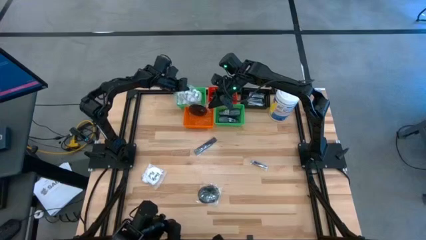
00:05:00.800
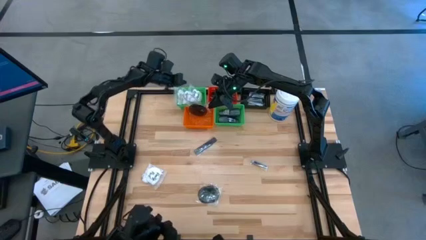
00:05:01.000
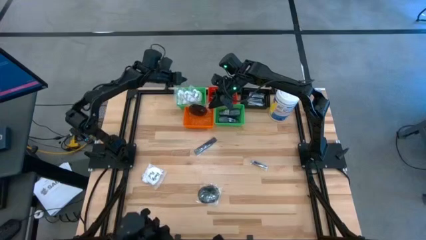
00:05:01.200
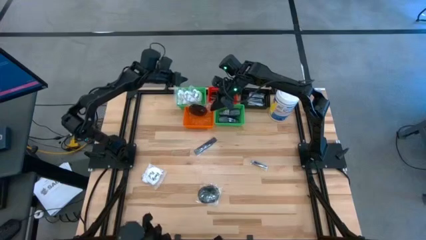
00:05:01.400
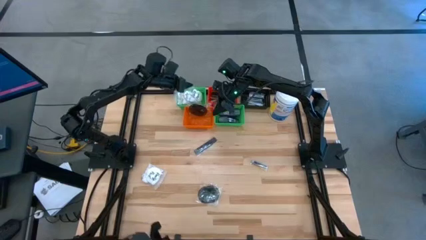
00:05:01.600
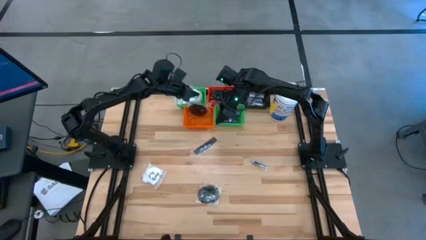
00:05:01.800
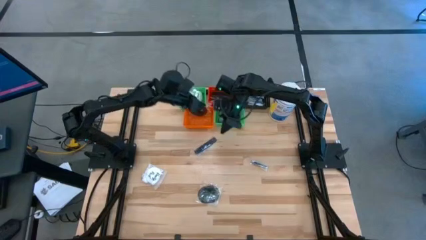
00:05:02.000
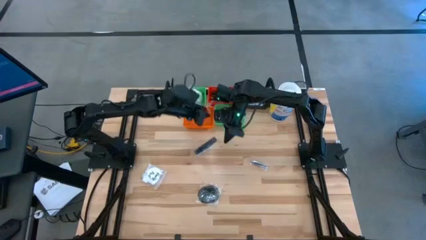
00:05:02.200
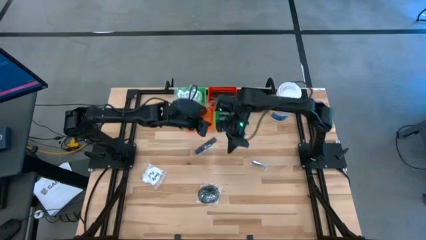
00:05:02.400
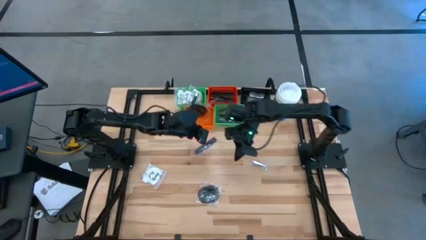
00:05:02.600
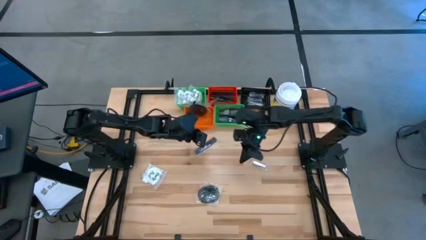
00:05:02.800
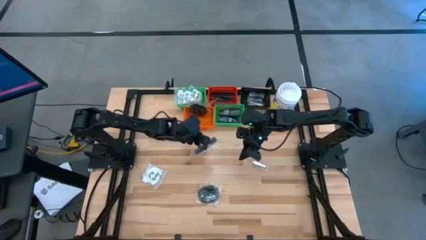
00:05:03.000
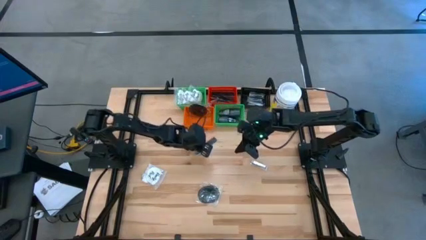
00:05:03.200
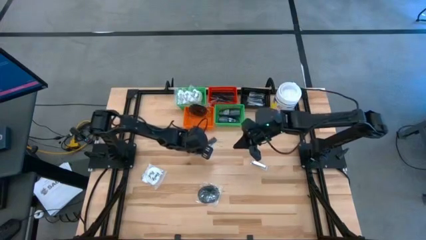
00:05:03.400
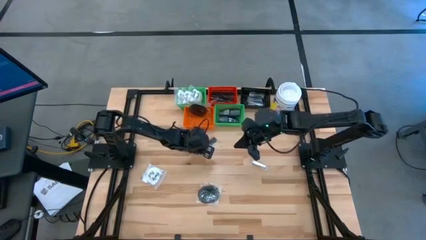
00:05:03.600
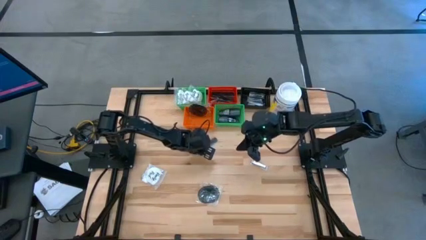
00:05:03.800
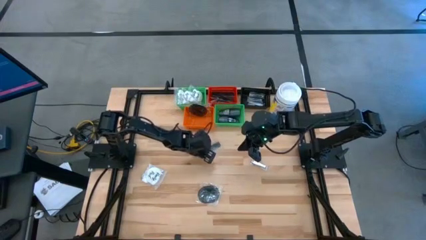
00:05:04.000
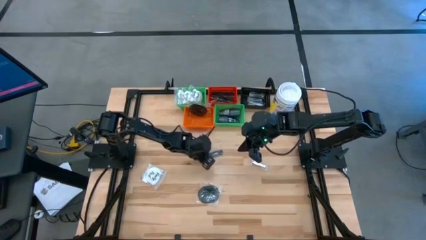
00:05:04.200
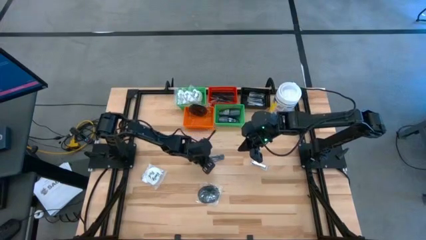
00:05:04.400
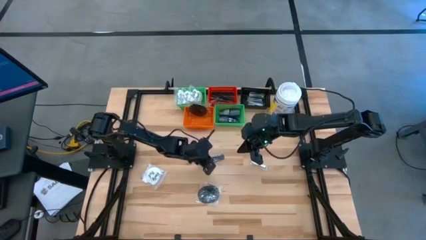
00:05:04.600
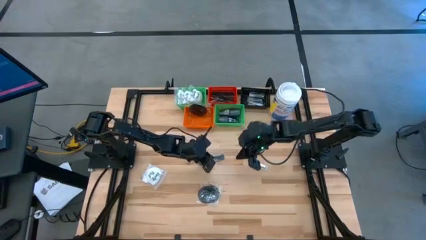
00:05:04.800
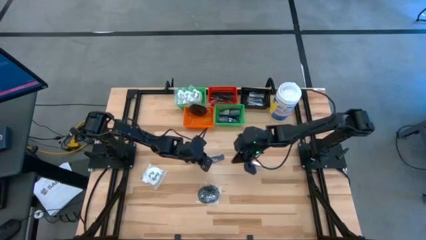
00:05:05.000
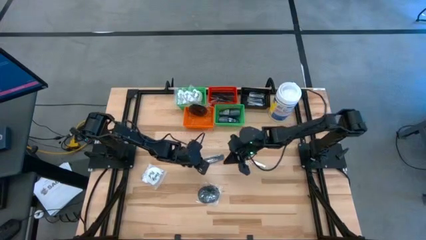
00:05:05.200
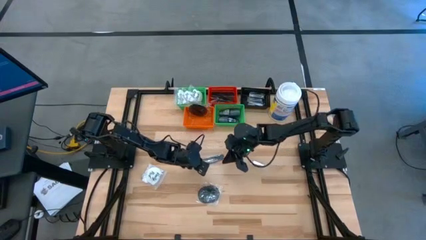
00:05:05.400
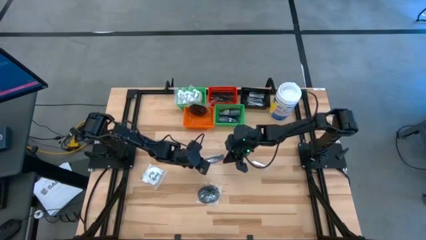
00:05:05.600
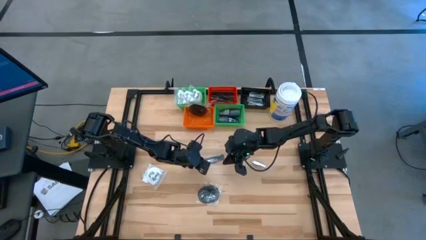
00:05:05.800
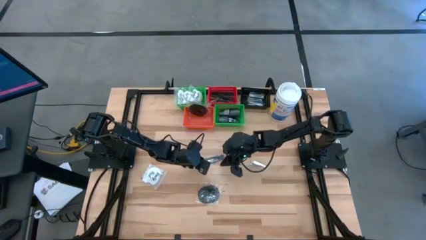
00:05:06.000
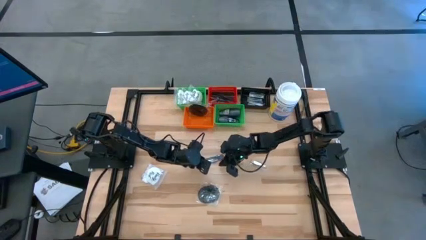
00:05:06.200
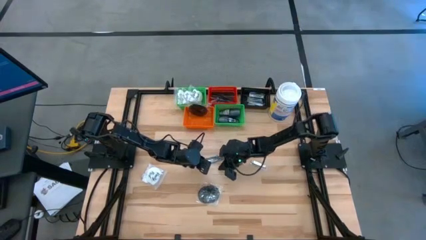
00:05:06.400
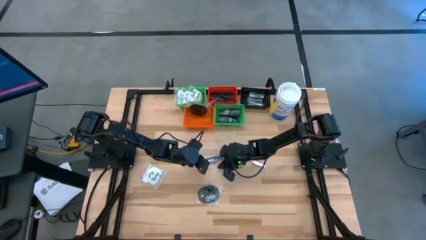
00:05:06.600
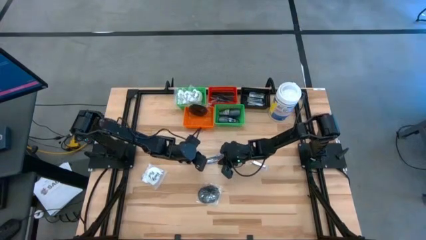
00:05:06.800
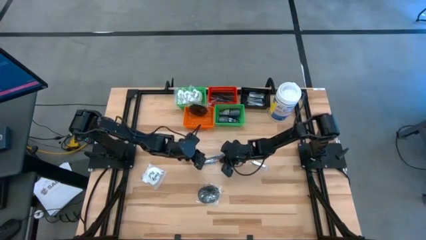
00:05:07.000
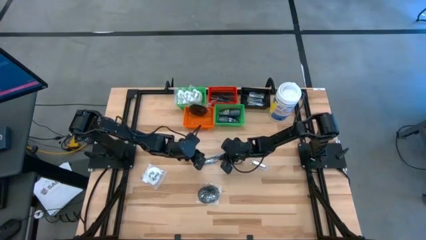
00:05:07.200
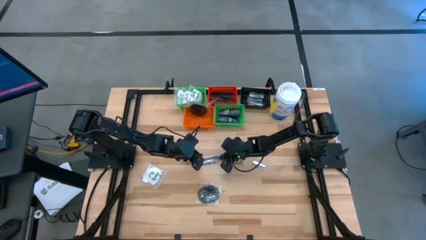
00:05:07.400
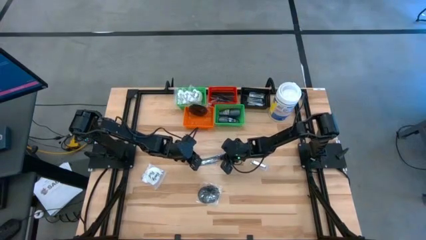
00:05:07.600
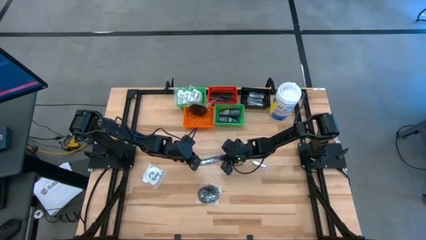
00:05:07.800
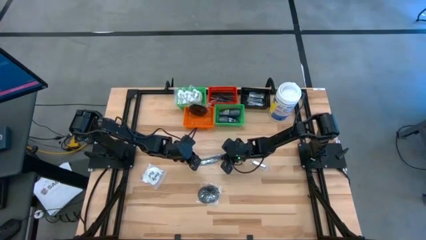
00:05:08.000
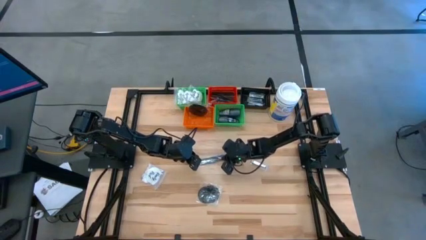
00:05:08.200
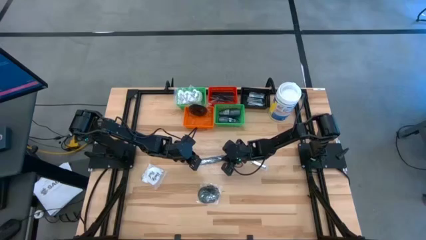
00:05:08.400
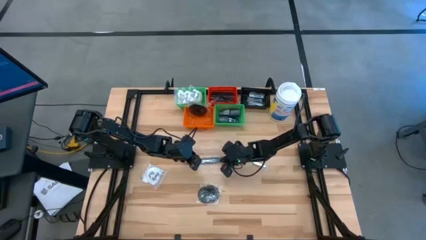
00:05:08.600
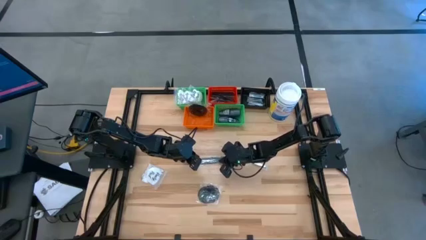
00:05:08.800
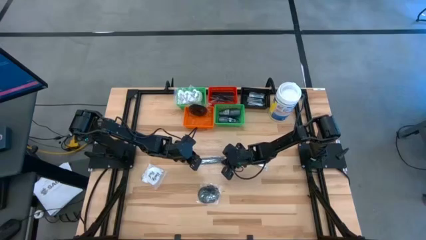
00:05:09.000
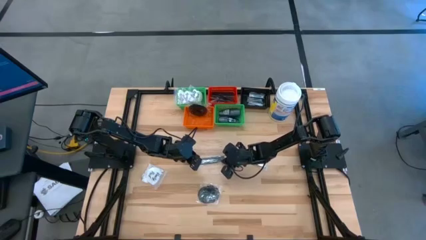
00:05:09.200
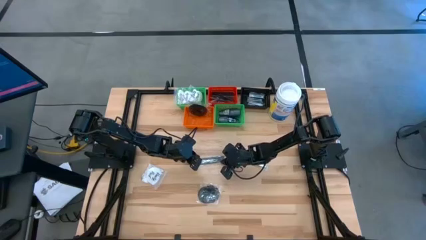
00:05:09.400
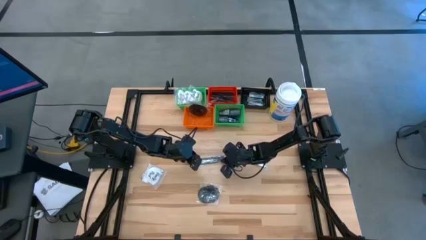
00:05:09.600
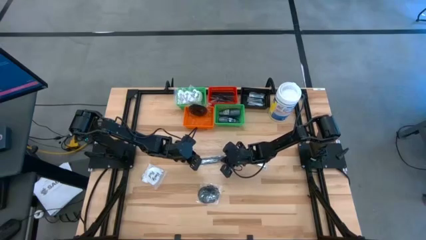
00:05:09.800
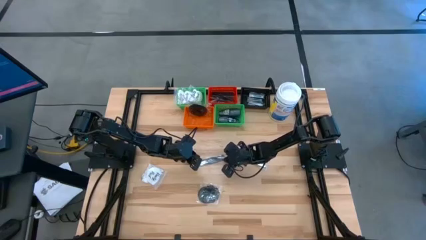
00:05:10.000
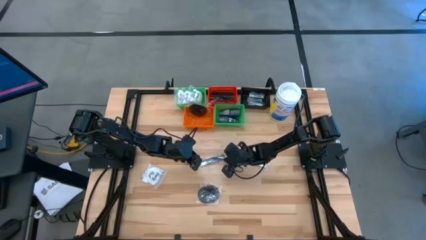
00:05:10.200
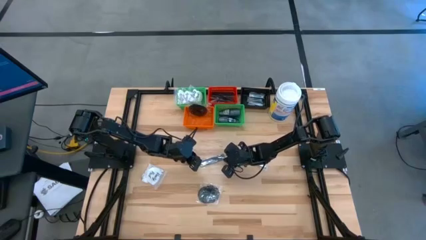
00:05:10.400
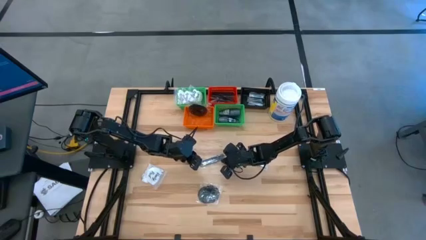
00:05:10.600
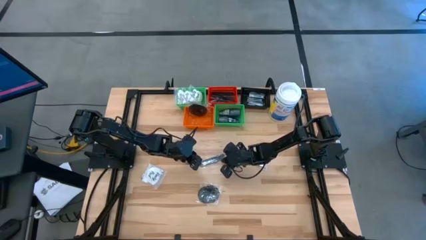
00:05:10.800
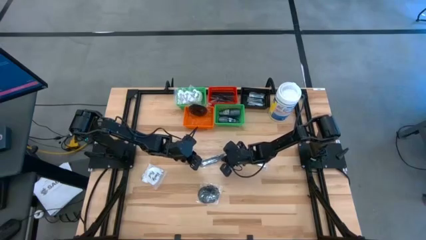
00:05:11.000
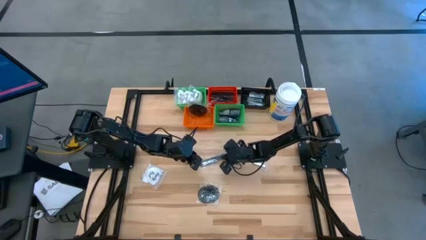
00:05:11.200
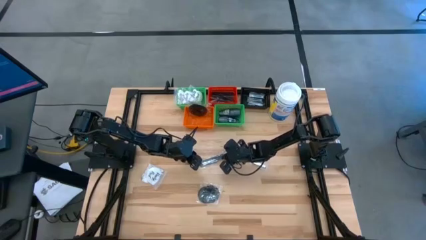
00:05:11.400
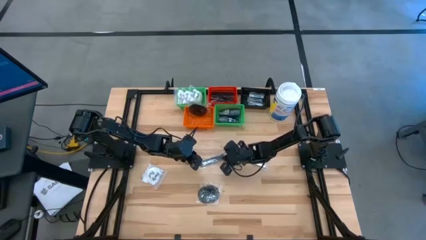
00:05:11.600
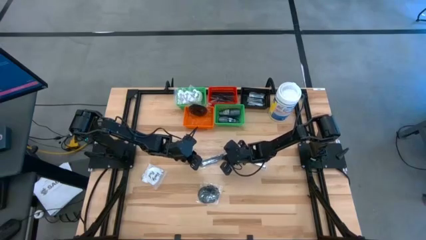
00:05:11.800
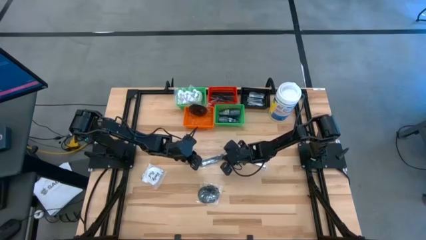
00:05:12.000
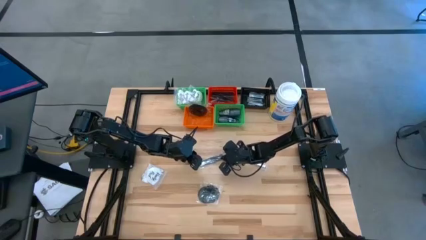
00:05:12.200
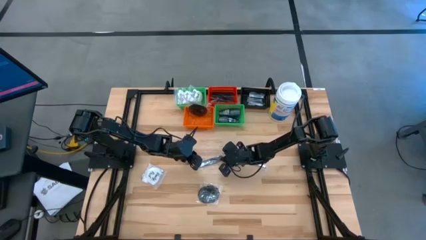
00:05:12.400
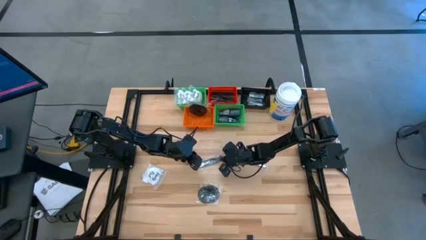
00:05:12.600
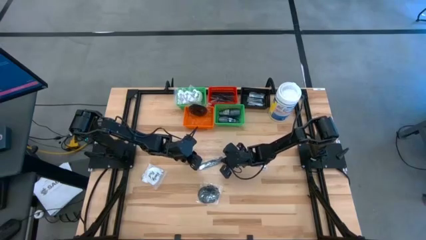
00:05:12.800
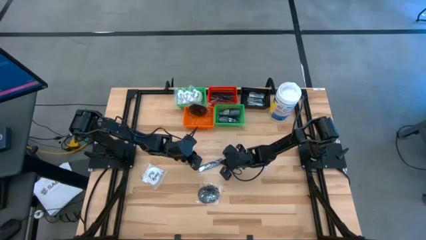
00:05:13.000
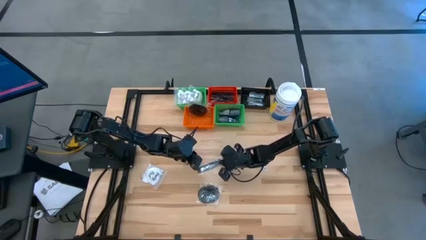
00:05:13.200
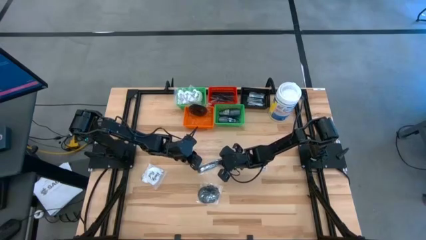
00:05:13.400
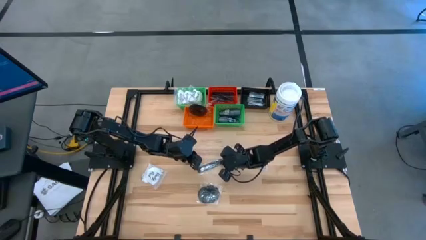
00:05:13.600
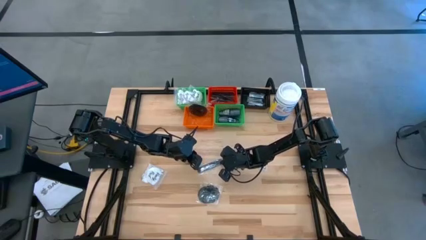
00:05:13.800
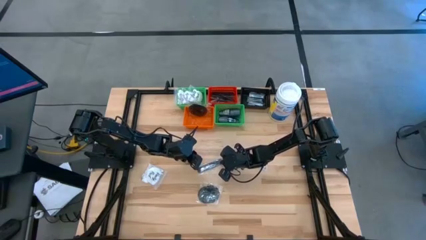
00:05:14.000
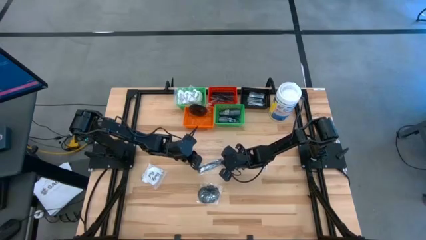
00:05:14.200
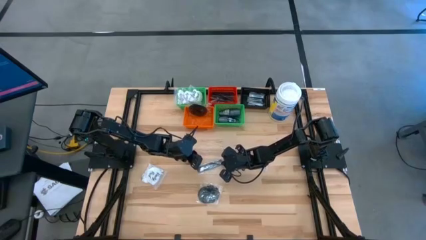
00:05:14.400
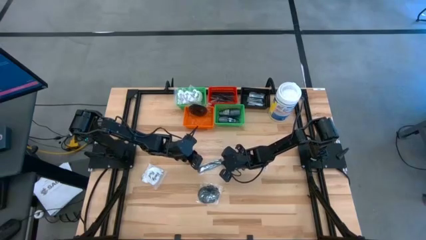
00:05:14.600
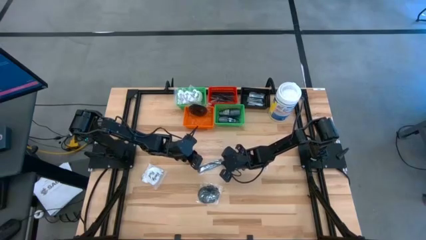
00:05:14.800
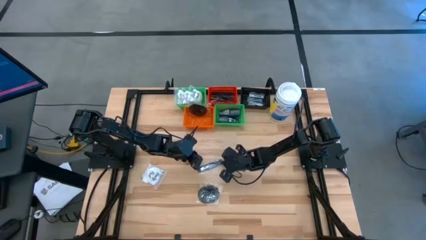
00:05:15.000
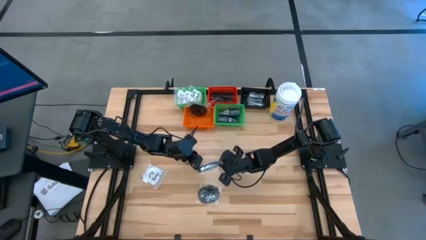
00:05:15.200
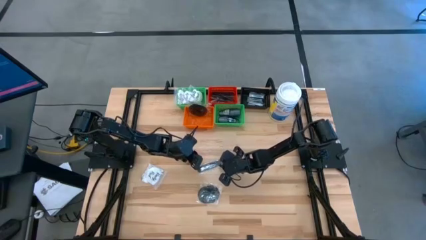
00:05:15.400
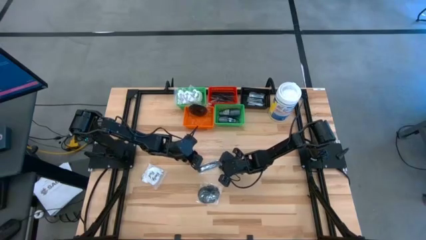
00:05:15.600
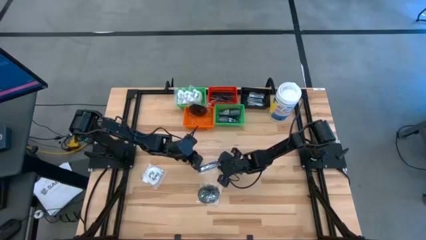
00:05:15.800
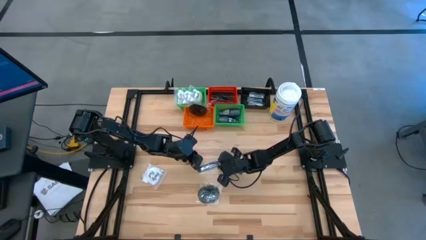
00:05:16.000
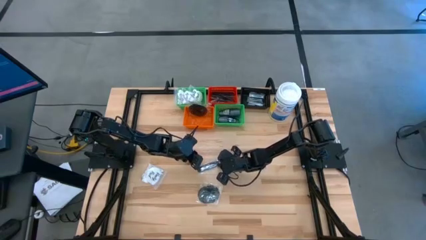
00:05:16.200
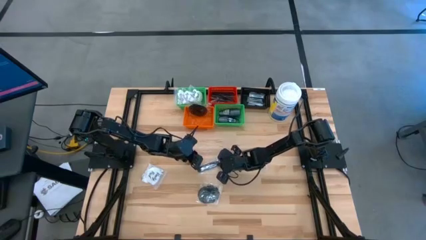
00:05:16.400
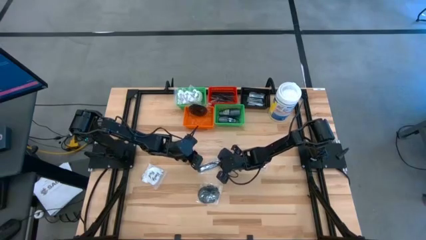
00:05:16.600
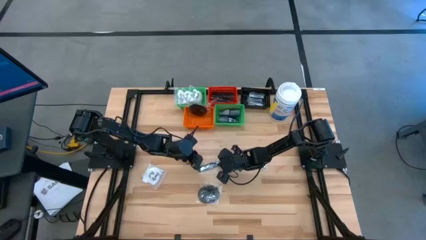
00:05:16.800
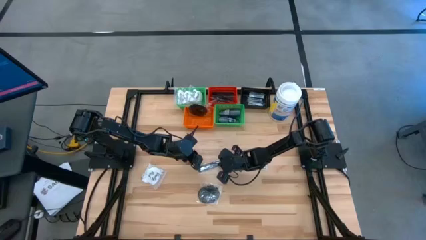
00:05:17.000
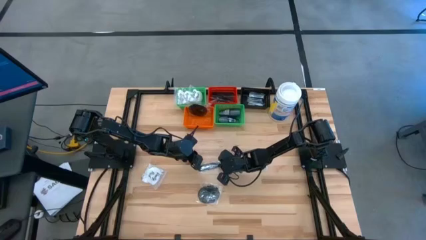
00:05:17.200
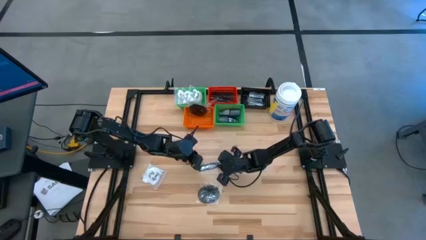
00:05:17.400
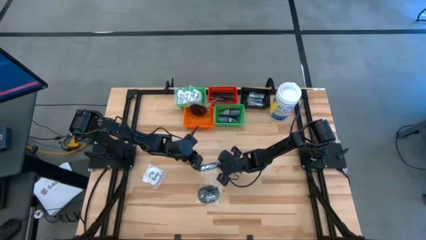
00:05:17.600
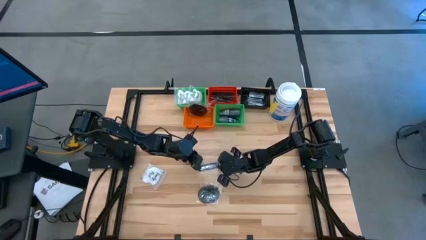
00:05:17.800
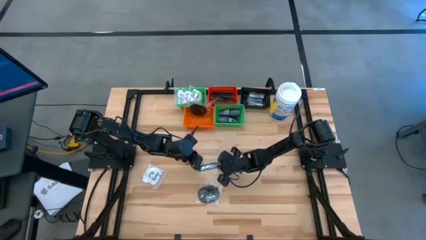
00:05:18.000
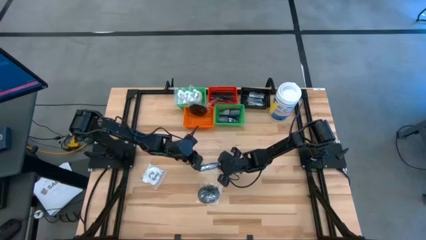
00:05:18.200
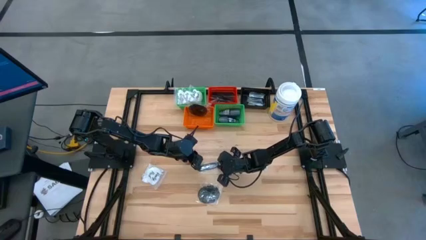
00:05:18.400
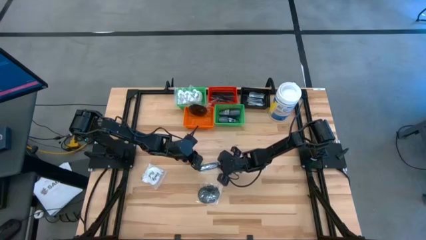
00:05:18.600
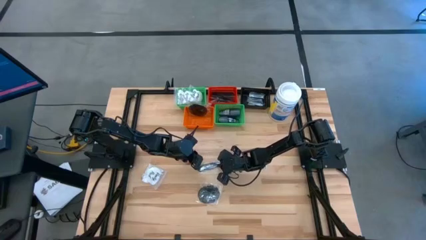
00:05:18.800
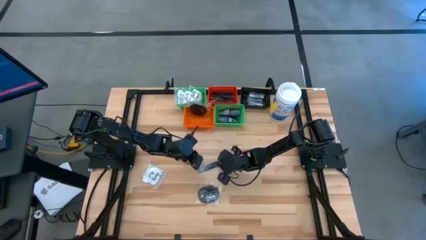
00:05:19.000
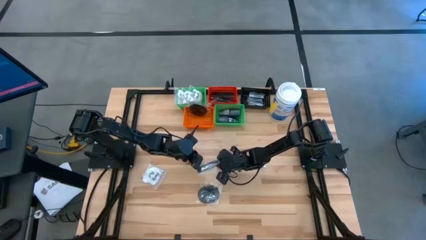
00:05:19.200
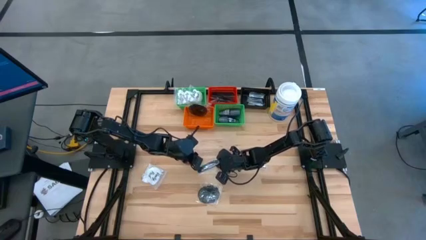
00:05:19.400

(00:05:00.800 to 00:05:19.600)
Task: Pick & Place Travel size toiletries
Put the black comb into the red bin
